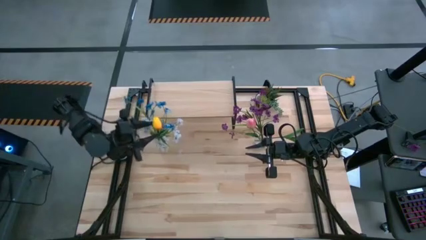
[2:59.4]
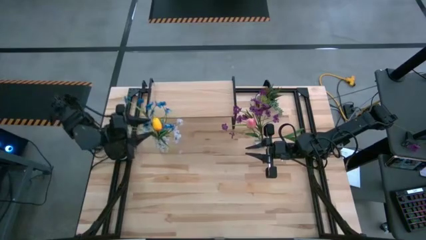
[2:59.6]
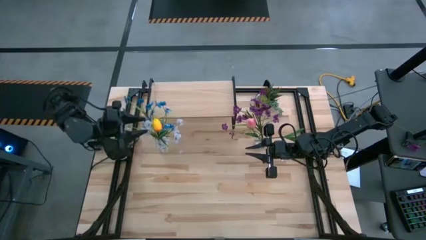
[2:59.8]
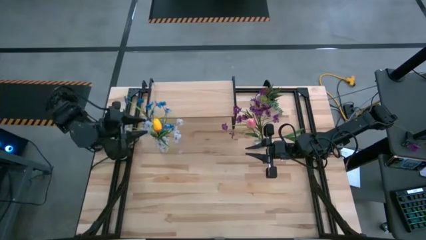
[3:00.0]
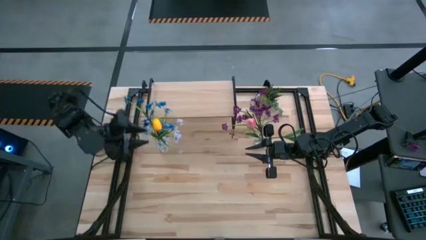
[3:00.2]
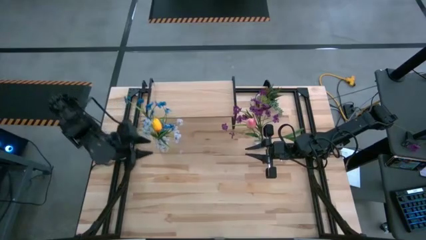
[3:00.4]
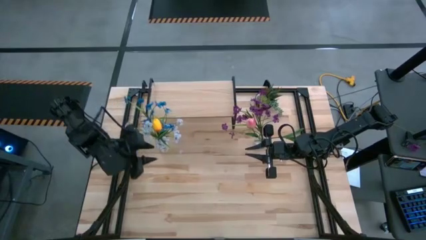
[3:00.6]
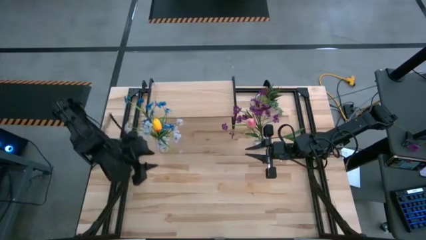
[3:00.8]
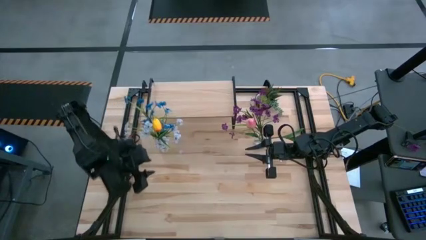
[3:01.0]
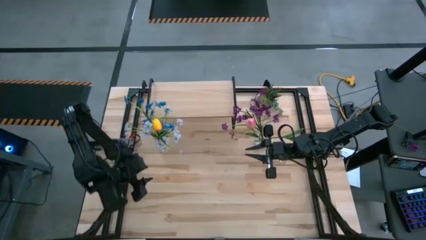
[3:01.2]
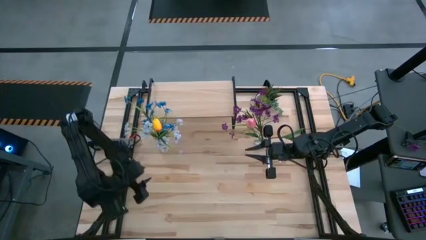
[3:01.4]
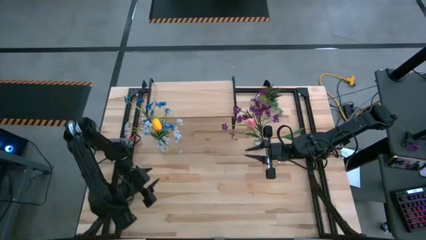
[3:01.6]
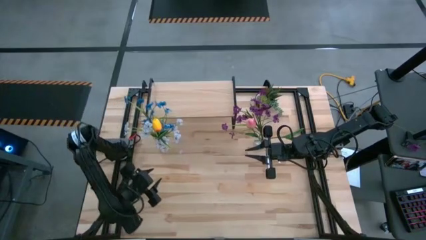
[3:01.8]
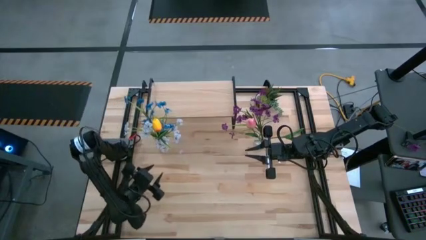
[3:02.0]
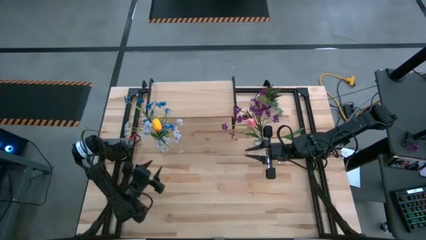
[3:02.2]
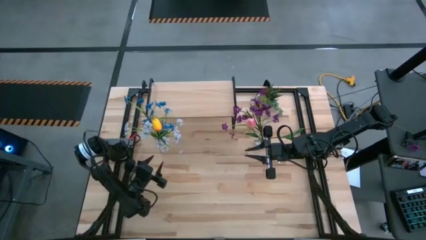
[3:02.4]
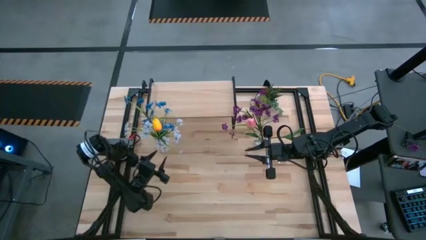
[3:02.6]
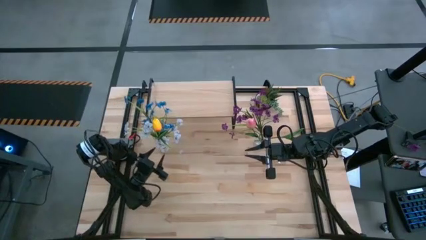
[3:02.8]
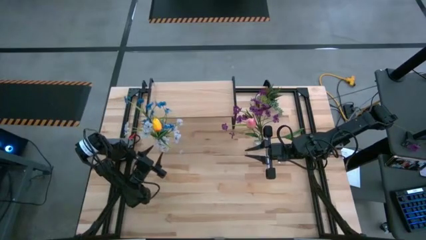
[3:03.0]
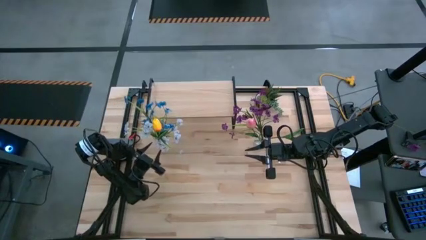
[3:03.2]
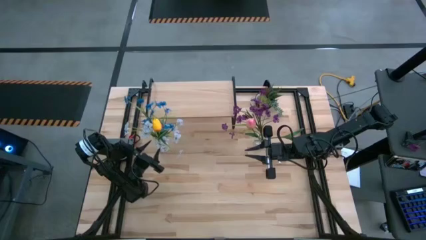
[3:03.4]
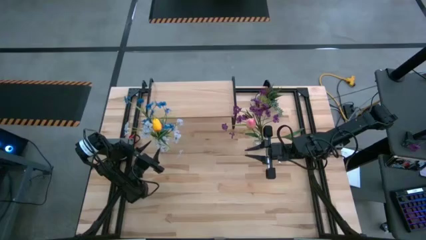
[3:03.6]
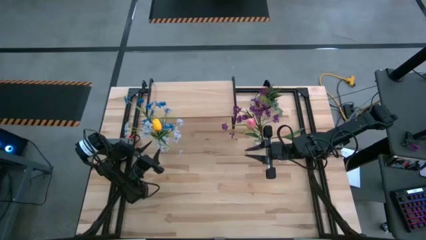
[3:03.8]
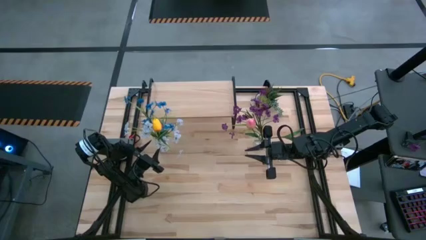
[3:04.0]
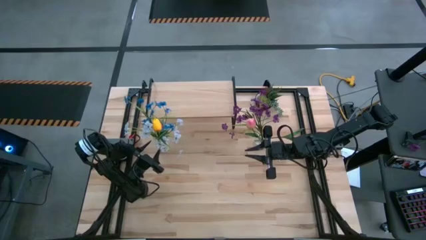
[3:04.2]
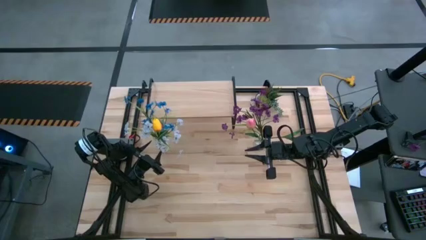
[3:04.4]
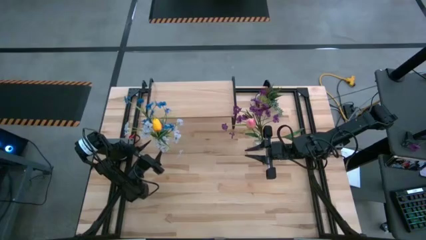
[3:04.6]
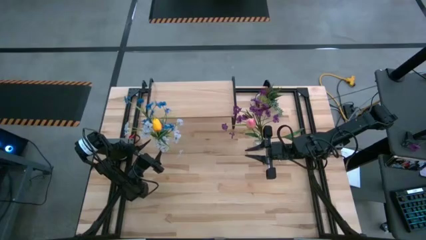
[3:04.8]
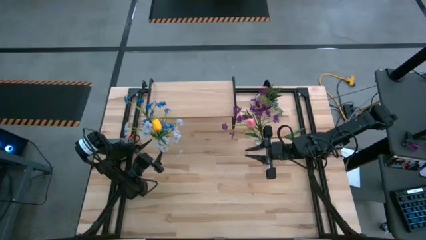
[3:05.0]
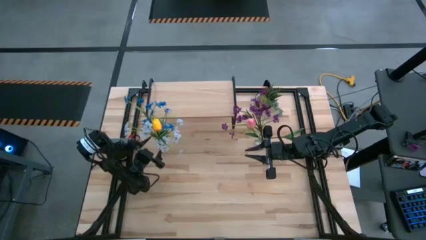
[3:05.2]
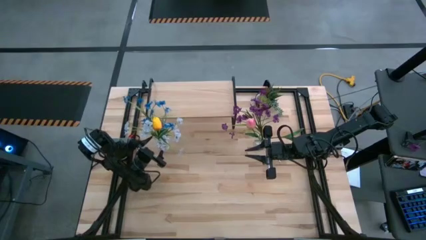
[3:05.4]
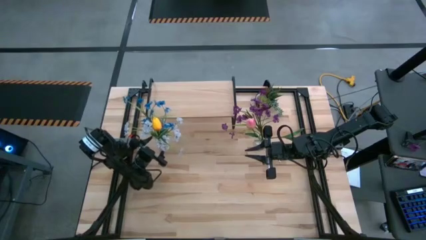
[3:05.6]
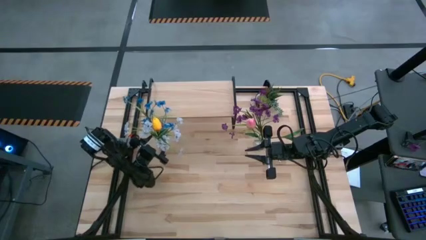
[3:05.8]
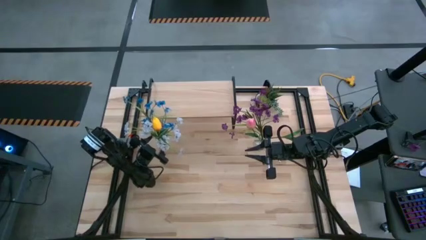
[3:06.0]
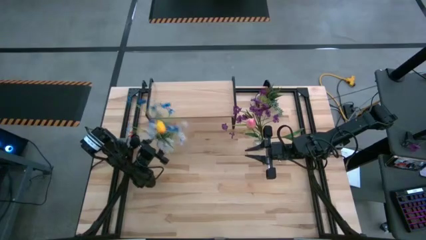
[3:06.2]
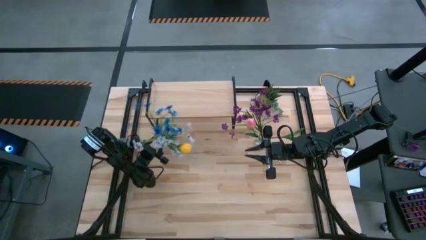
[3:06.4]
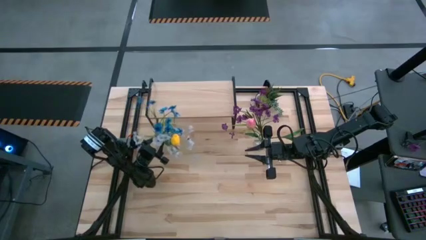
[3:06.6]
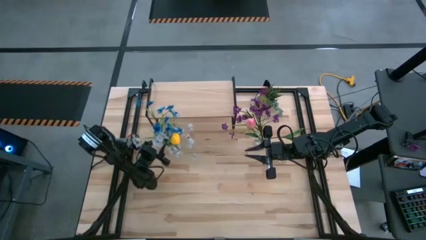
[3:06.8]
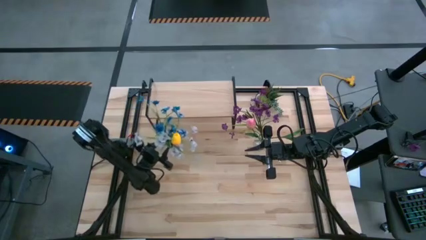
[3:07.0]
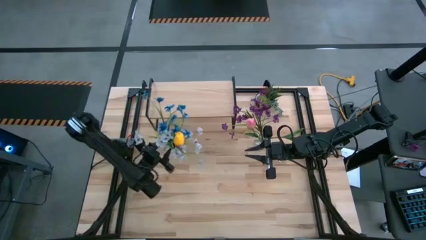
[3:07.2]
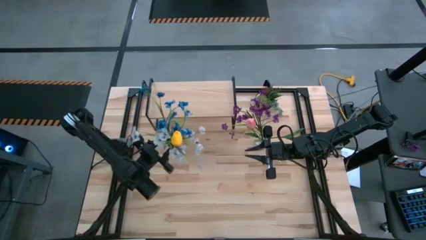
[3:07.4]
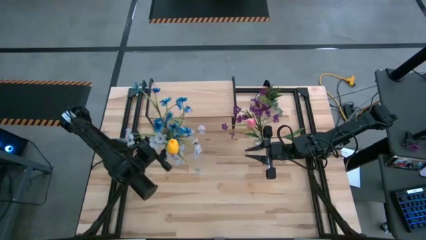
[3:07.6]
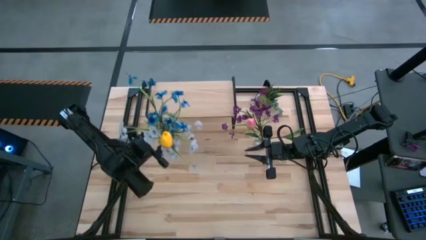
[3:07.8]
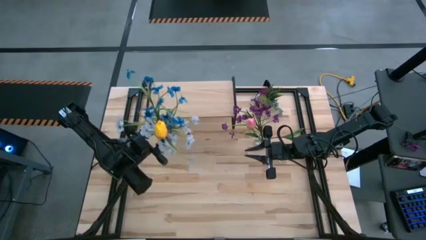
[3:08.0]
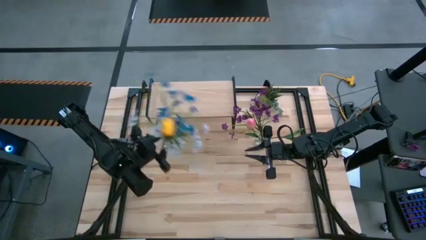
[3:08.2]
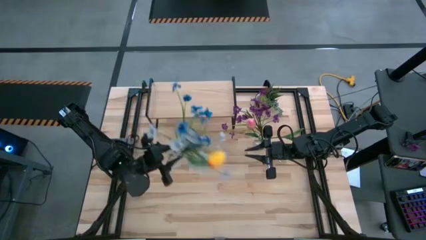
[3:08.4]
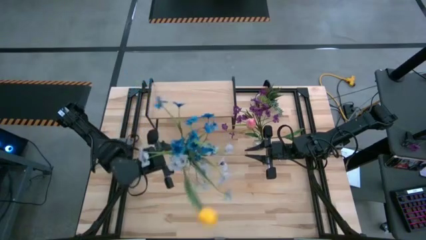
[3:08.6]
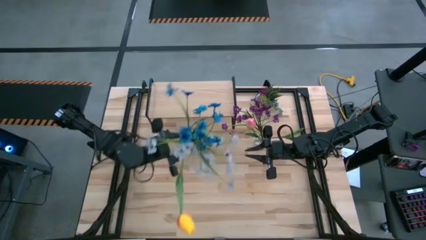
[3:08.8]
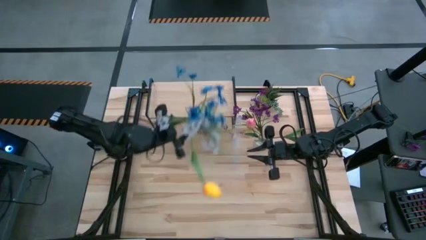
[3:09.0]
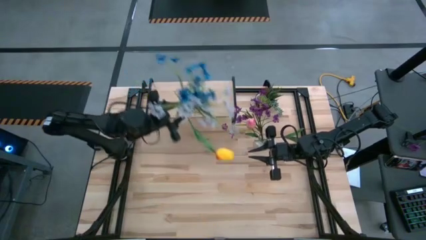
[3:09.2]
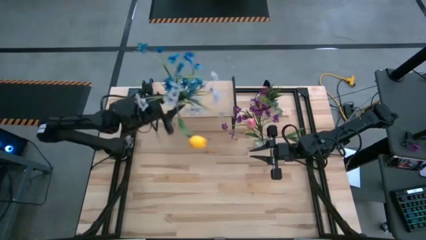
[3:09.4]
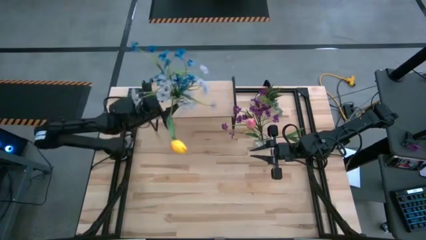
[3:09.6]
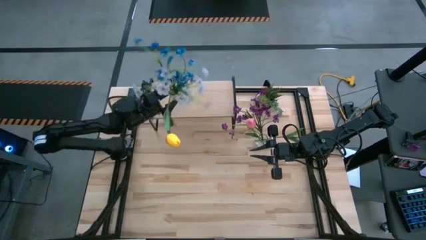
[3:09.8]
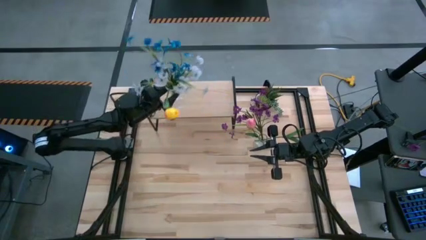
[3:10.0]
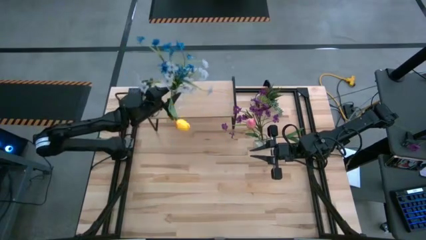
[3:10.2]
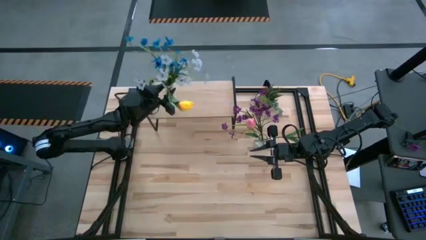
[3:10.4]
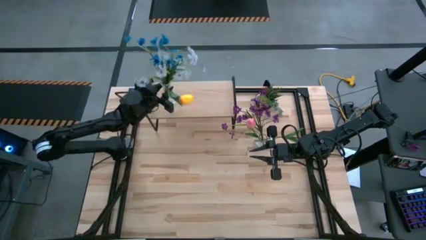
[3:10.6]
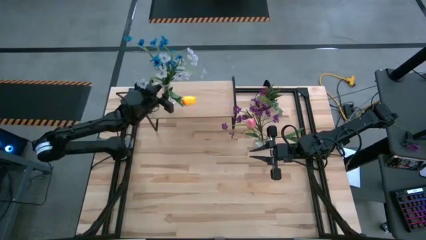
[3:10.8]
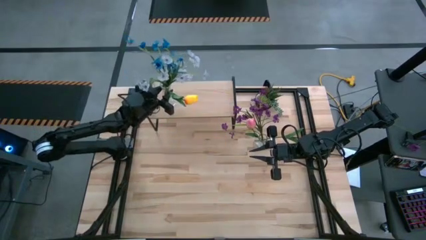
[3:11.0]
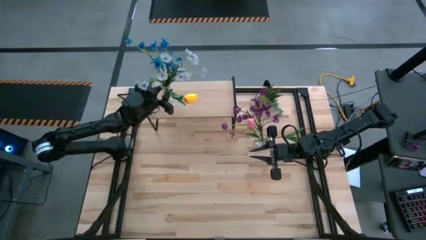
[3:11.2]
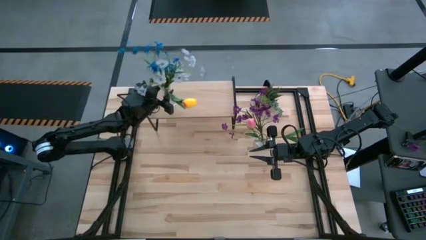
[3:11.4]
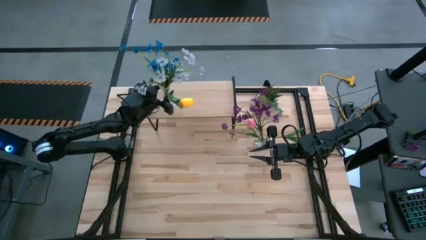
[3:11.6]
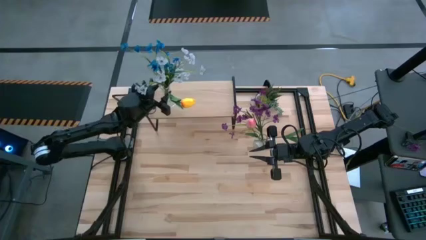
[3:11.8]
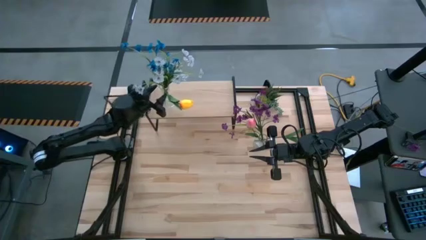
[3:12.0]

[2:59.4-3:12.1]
Task: Pick and place flowers into a vace then onto a shelf
Put the left transparent vase on the shelf

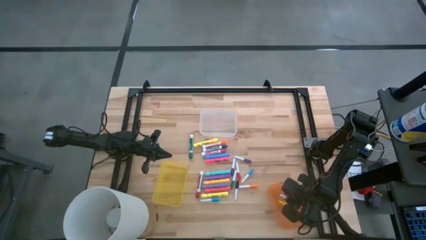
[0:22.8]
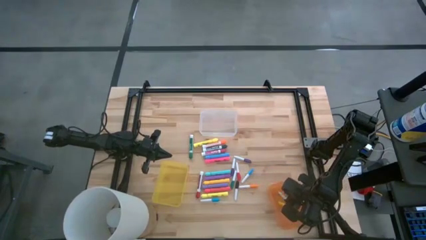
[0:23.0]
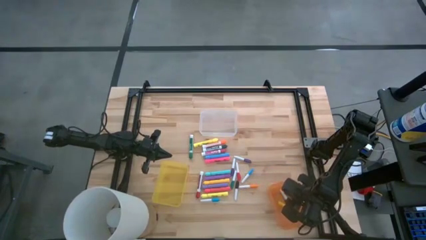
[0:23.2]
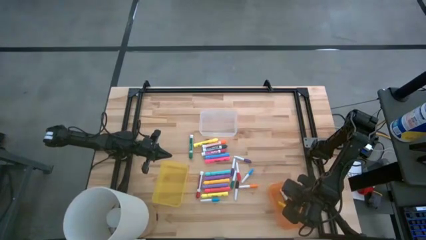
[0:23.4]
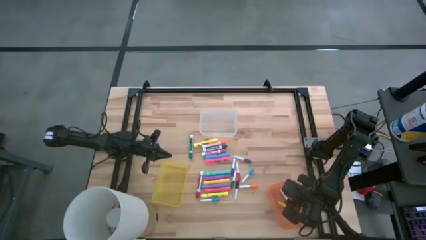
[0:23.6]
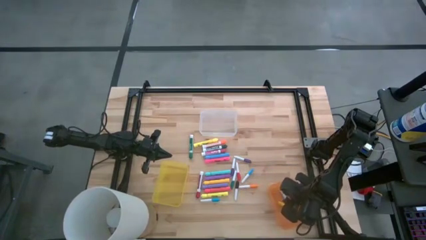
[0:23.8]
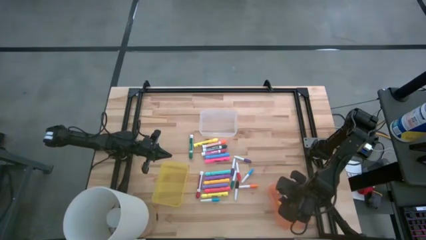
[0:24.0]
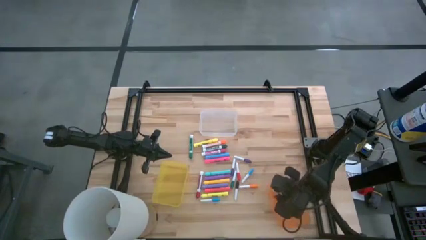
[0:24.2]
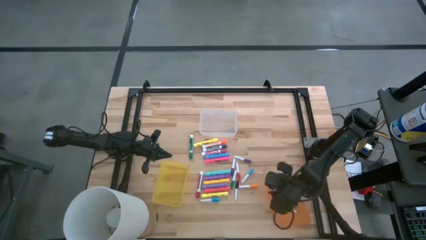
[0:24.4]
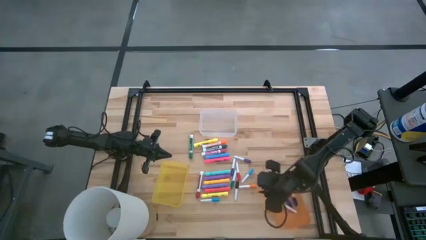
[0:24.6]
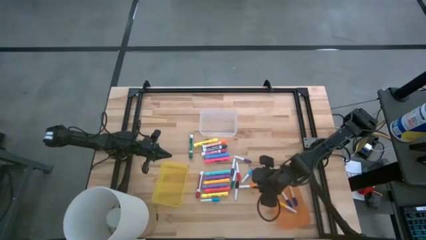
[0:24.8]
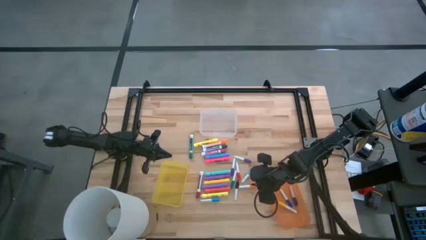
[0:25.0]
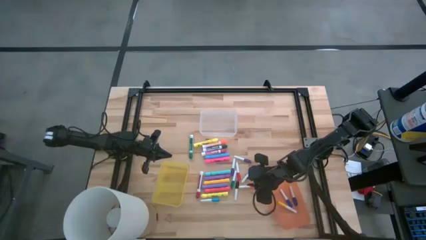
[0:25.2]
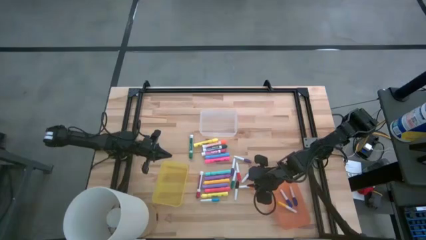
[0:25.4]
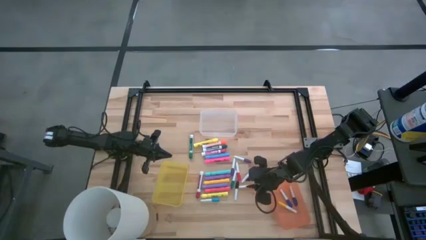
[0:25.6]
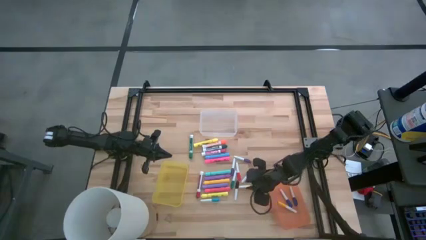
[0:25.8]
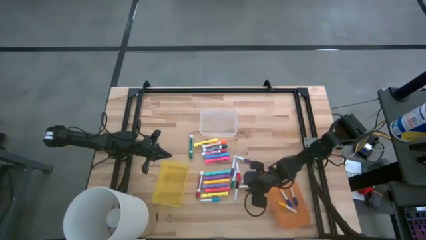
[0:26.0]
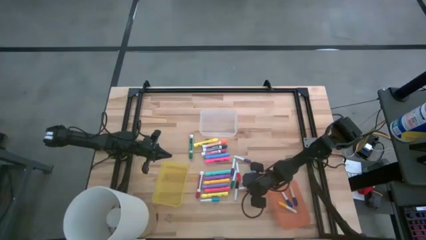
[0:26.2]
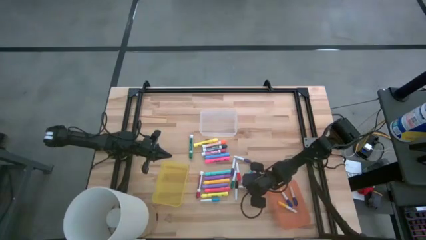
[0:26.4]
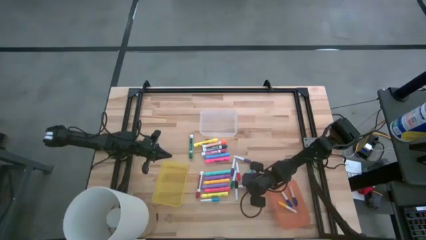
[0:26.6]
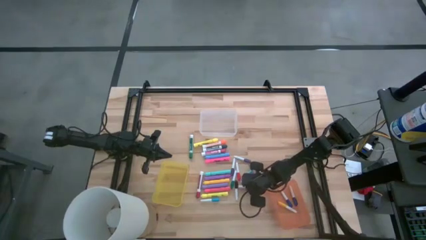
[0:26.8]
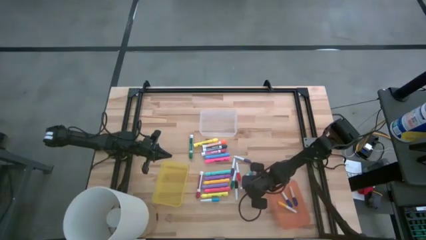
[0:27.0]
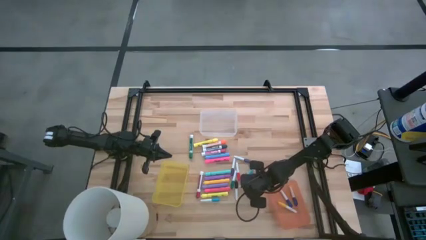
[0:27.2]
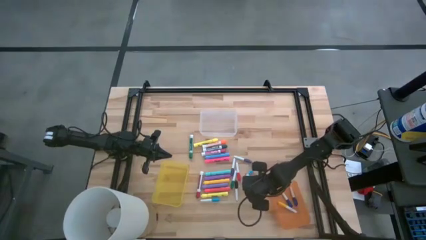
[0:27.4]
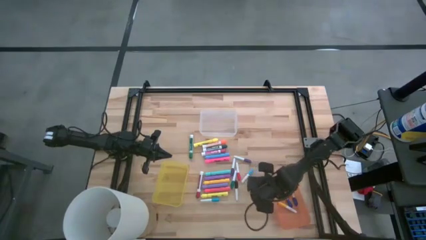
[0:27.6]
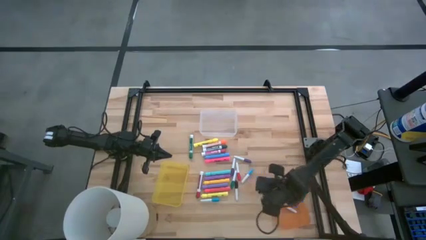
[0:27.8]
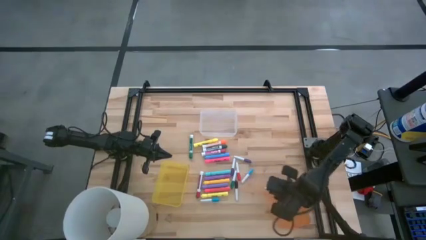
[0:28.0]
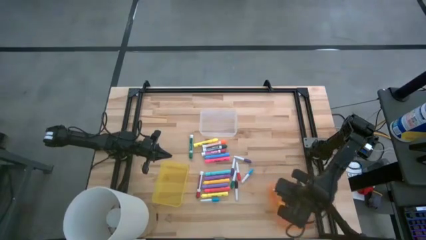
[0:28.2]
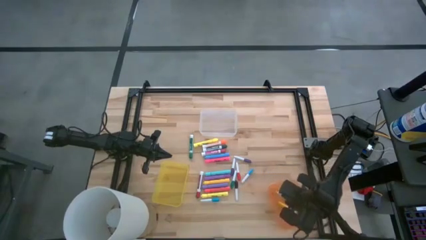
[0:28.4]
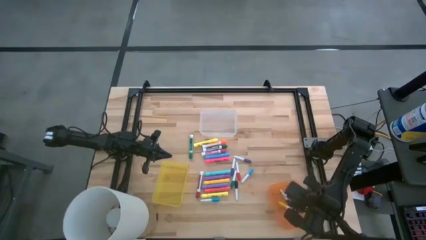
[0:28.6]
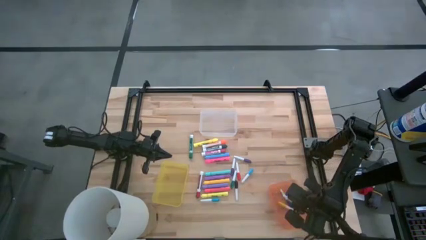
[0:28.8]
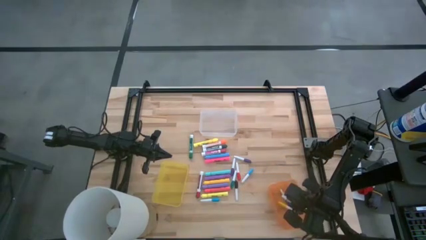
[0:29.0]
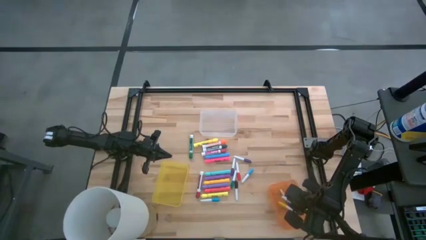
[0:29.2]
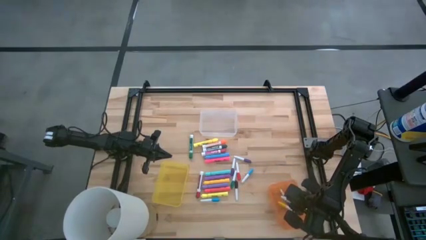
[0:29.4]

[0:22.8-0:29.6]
Task: Pick & Place Markers
Put the small orange highlighter pen into the orange bin
